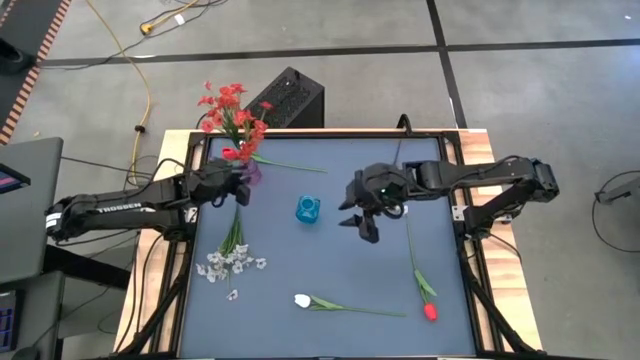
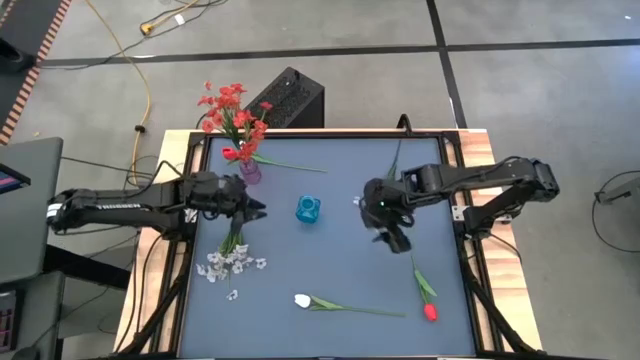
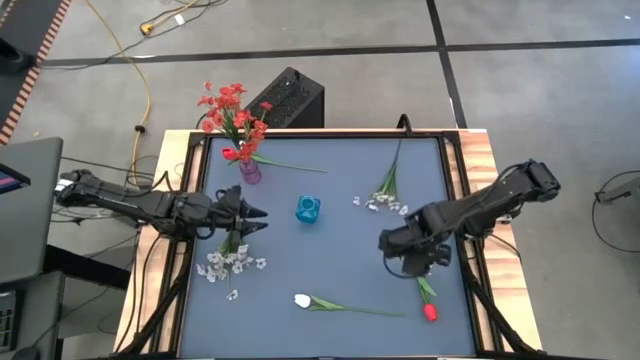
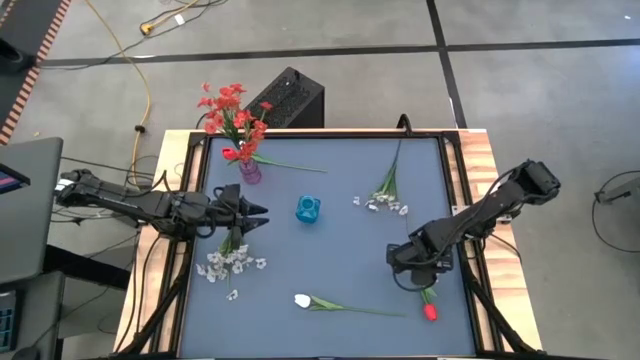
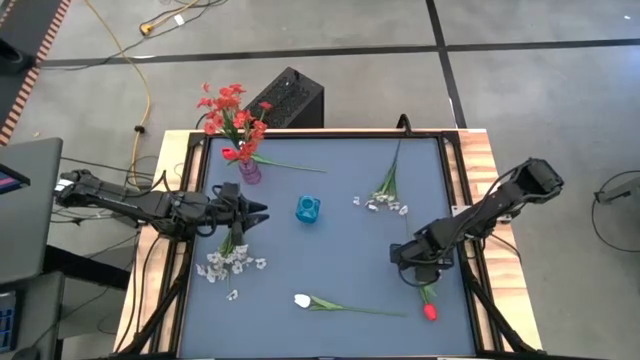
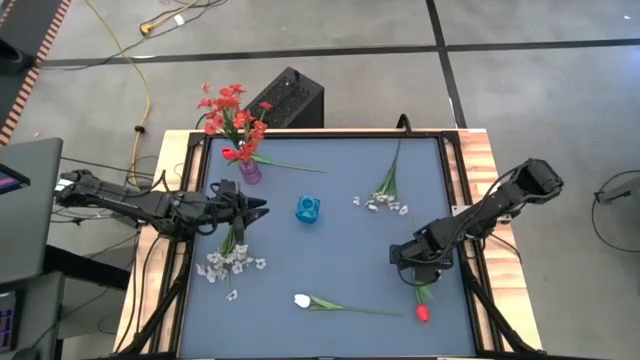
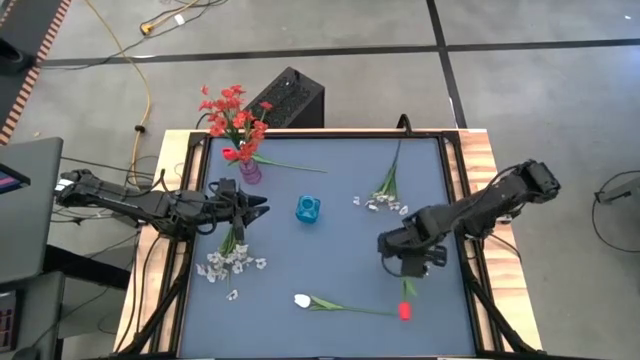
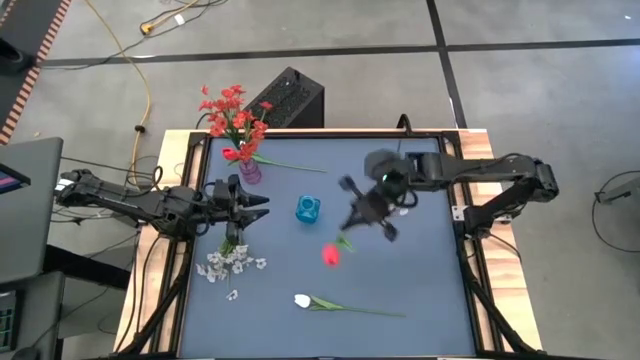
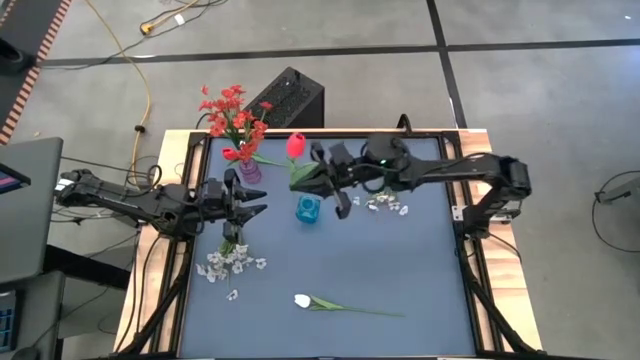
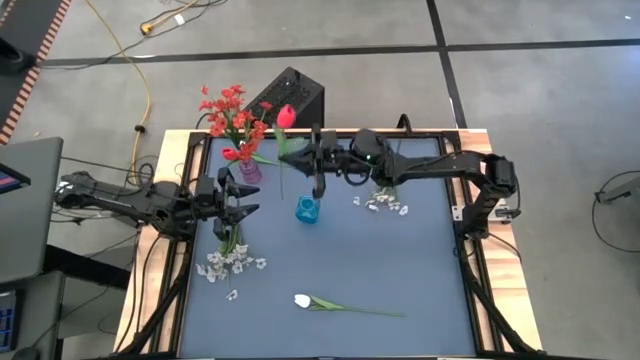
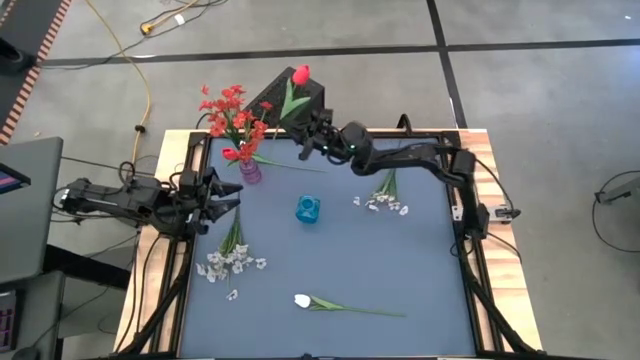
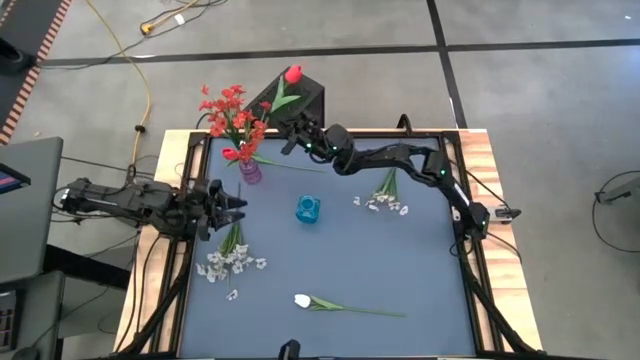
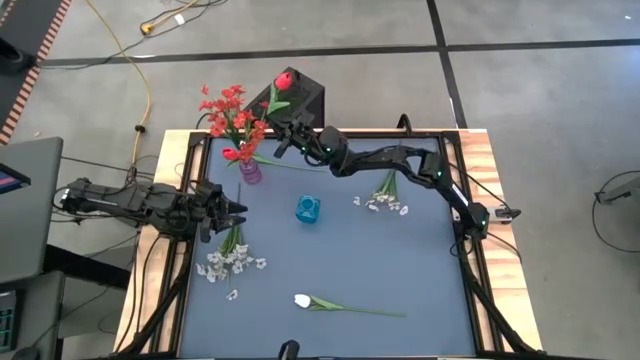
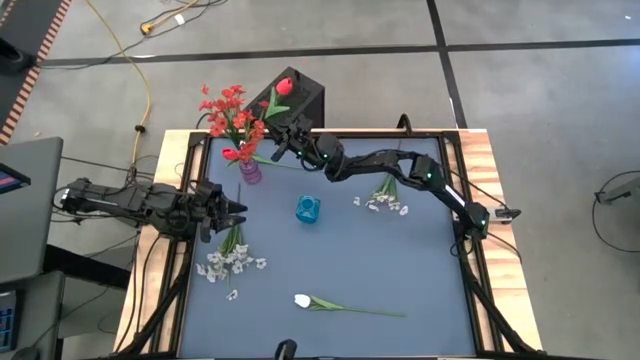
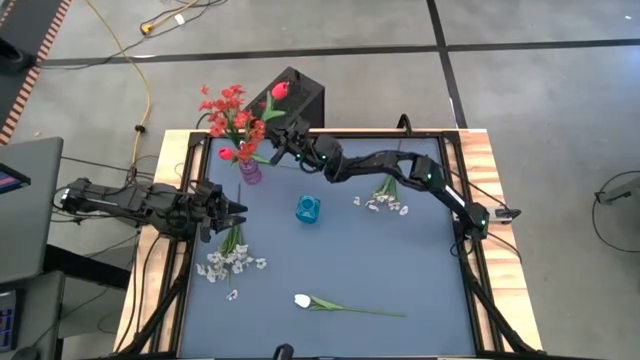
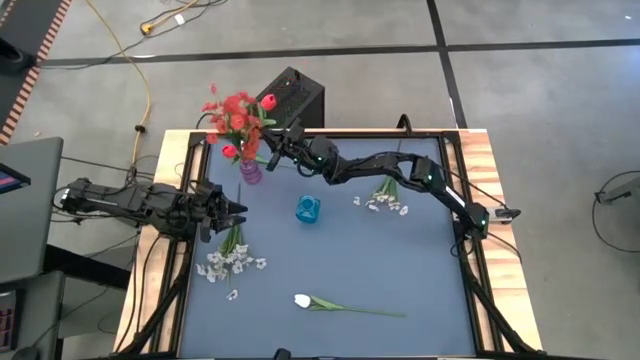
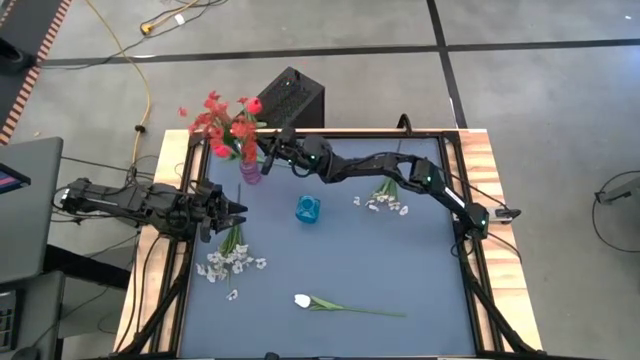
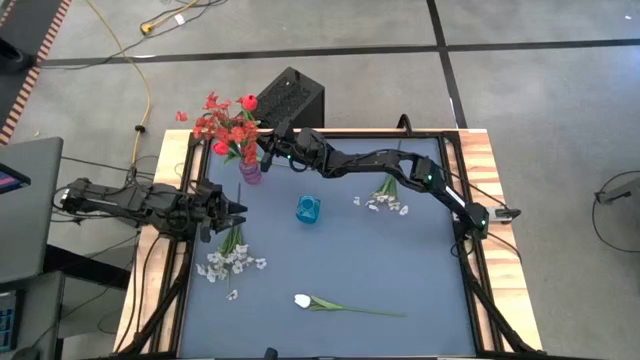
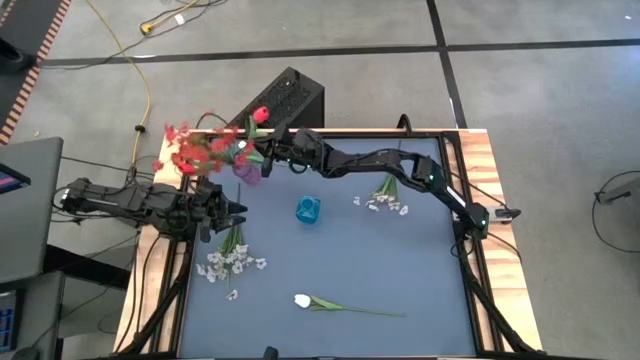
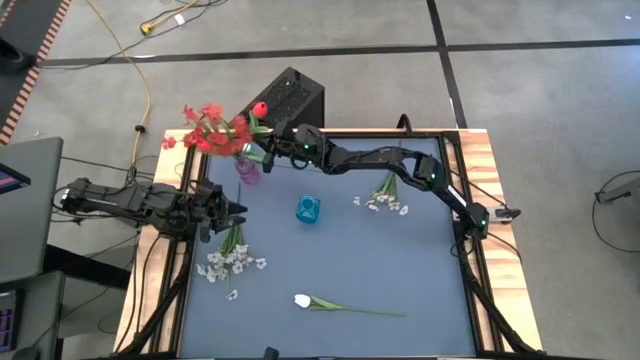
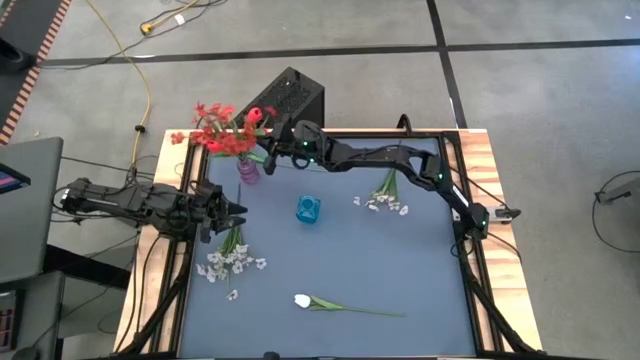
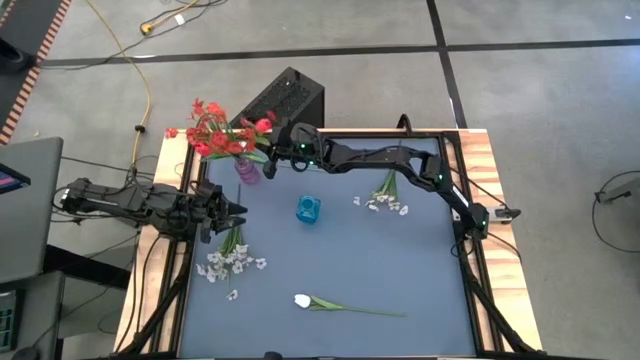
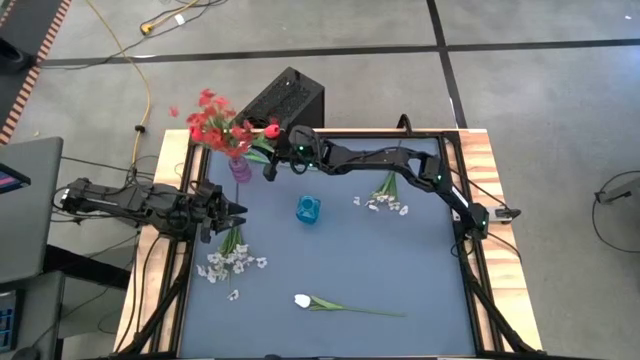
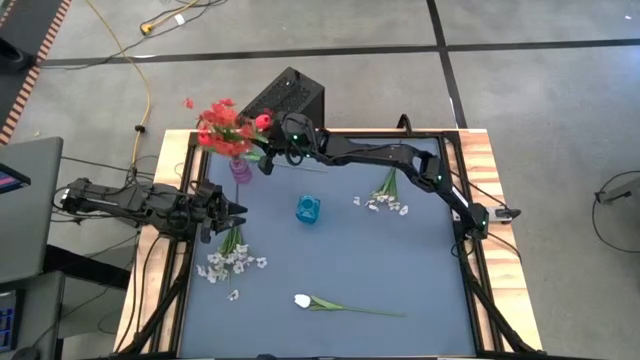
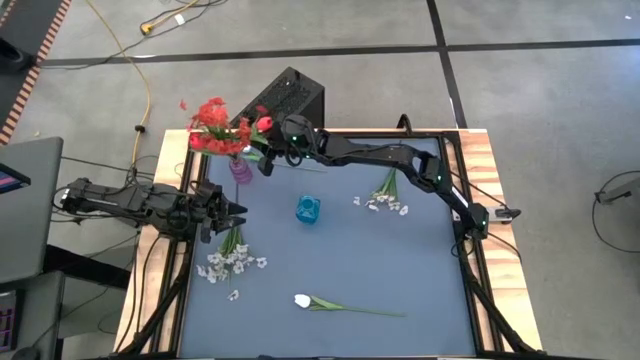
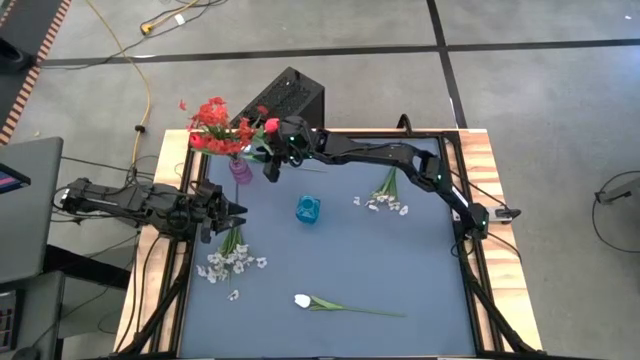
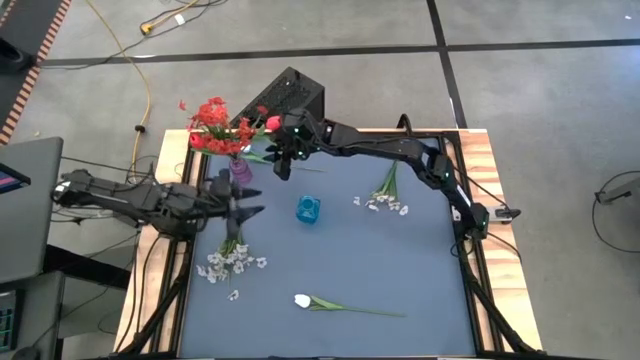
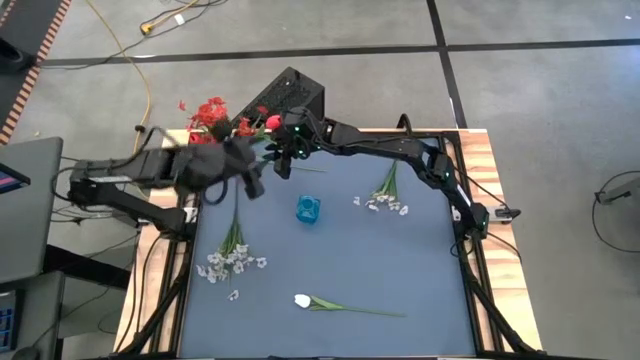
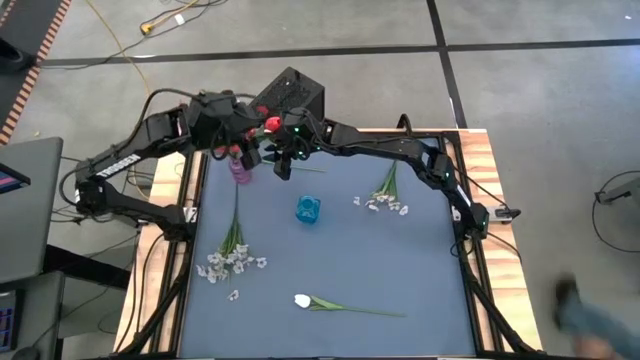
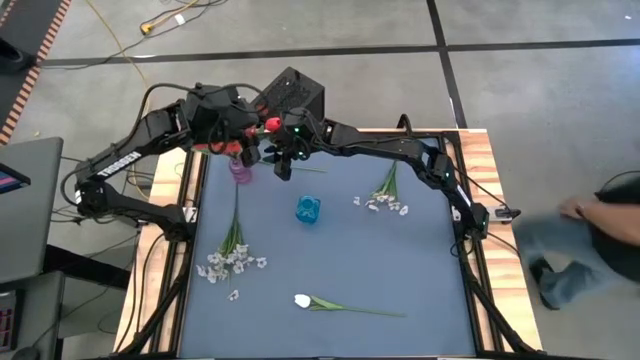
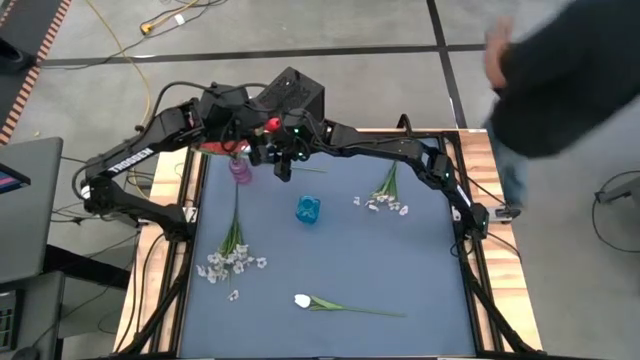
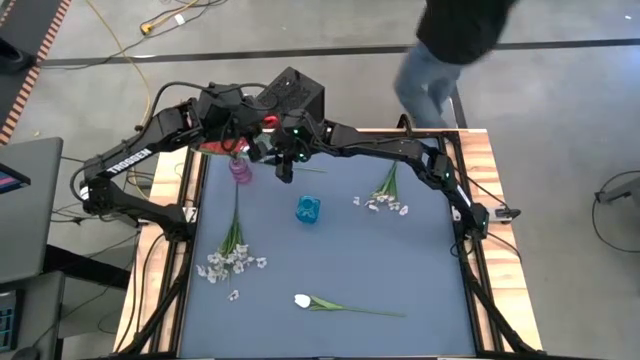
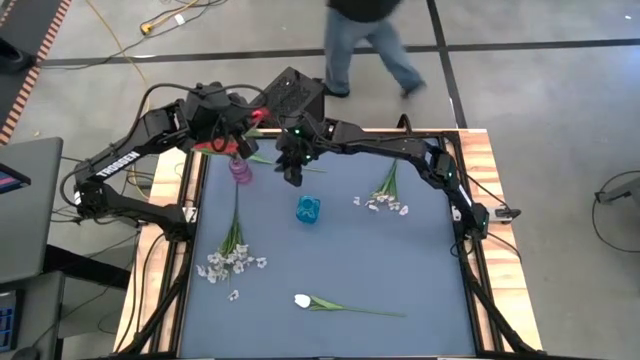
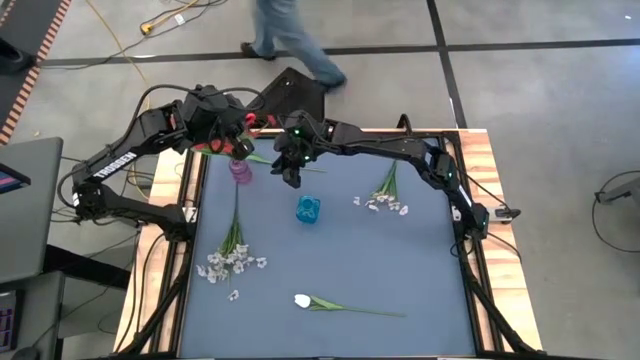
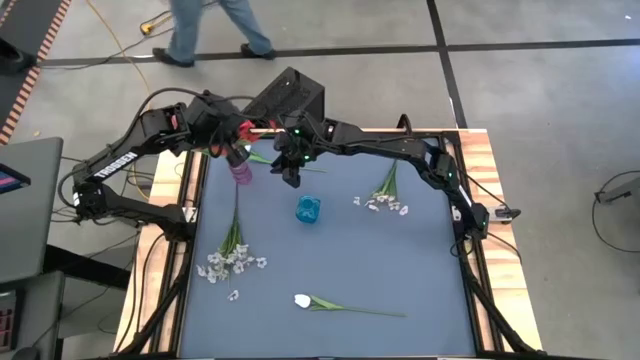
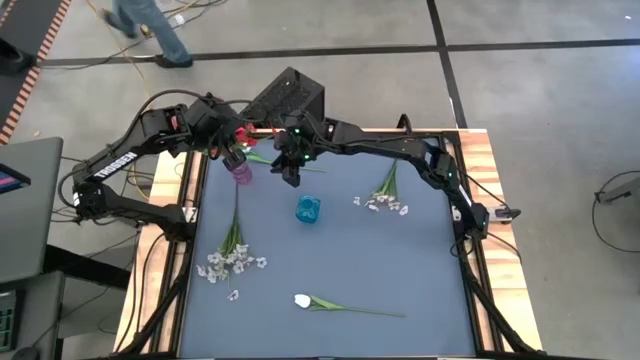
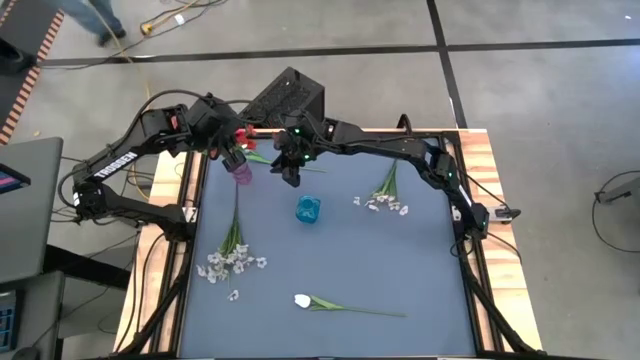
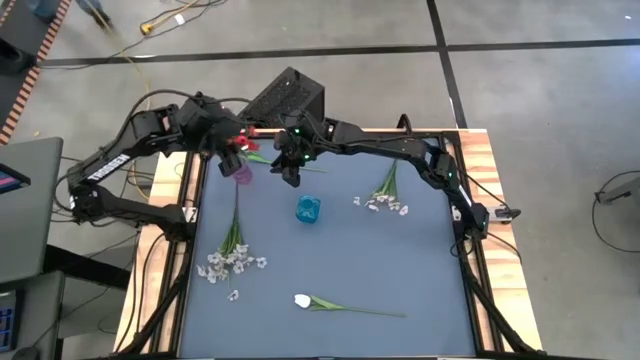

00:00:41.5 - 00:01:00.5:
Task: Sort flowers into vase by color
Put the red tulip into the purple vase
